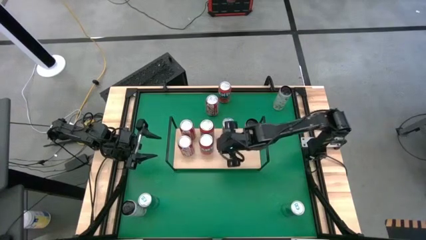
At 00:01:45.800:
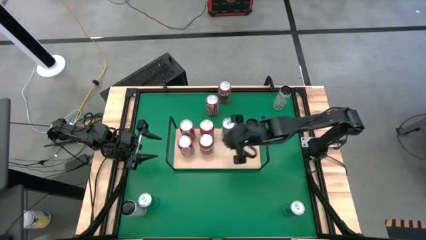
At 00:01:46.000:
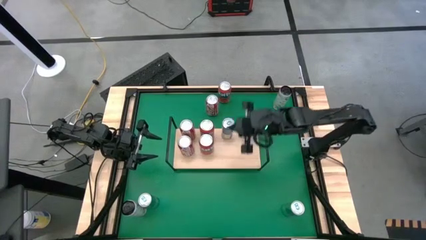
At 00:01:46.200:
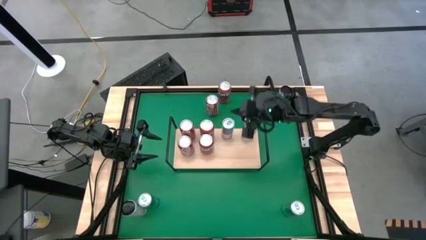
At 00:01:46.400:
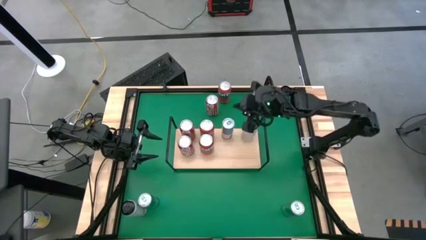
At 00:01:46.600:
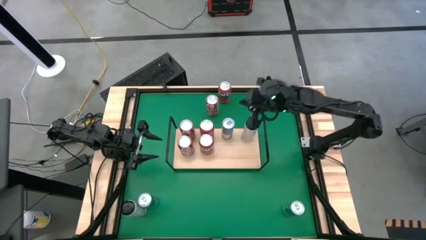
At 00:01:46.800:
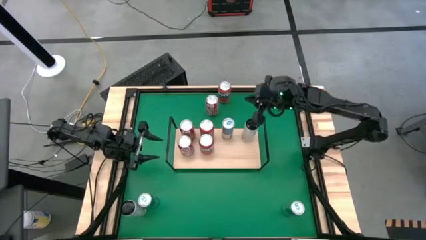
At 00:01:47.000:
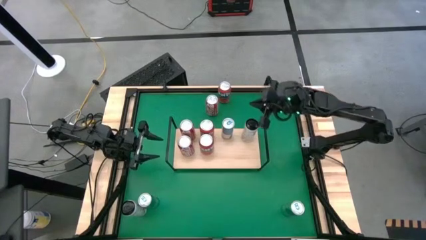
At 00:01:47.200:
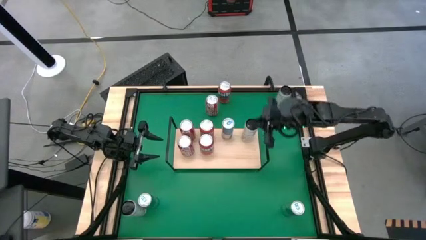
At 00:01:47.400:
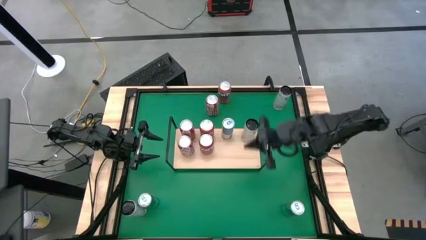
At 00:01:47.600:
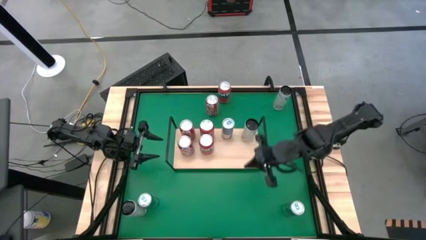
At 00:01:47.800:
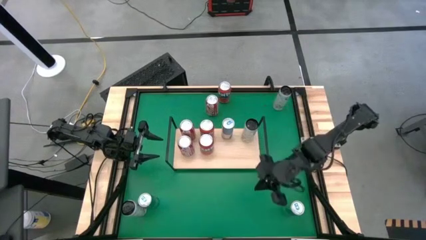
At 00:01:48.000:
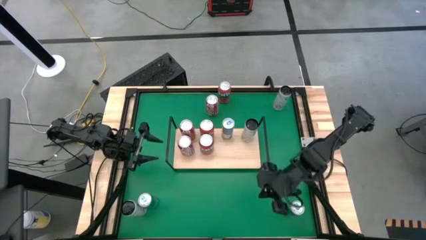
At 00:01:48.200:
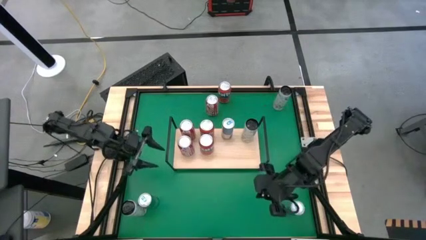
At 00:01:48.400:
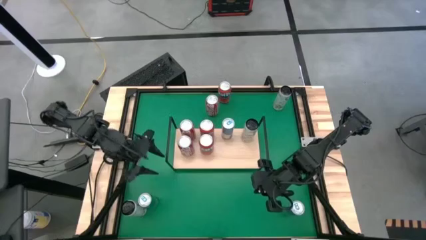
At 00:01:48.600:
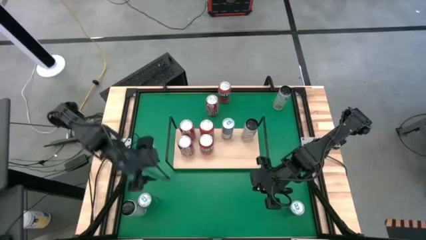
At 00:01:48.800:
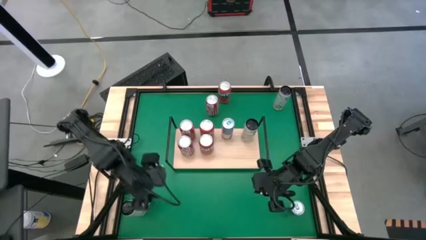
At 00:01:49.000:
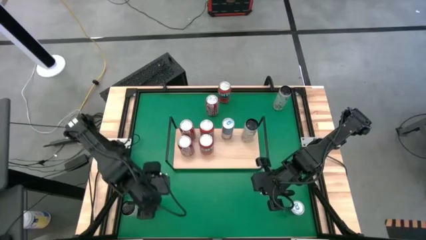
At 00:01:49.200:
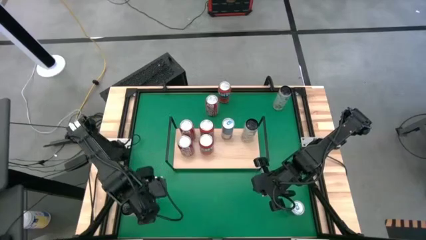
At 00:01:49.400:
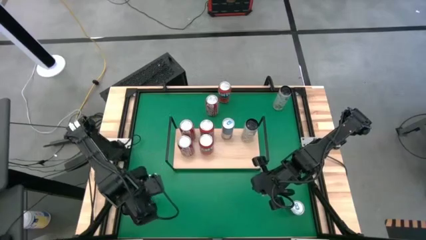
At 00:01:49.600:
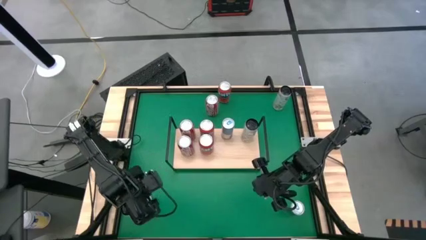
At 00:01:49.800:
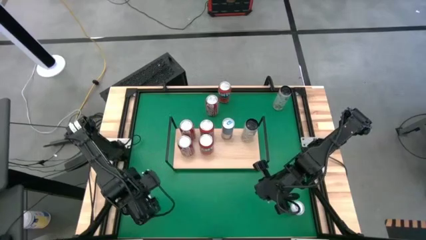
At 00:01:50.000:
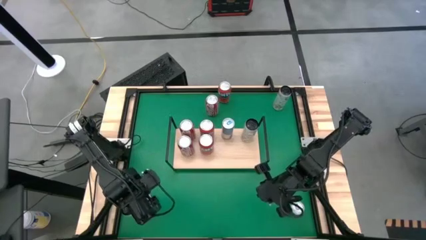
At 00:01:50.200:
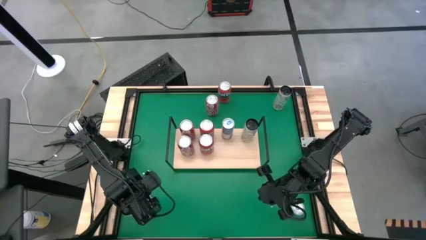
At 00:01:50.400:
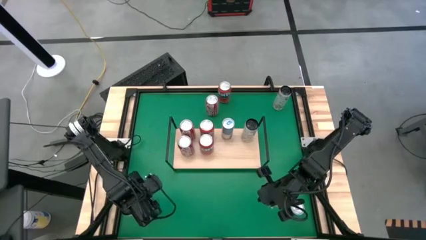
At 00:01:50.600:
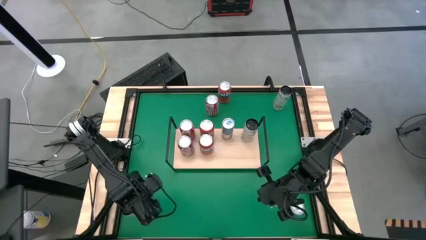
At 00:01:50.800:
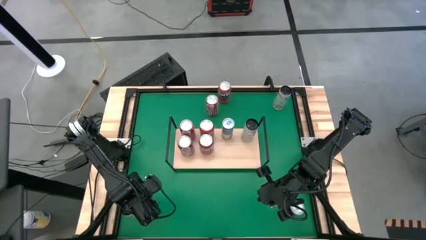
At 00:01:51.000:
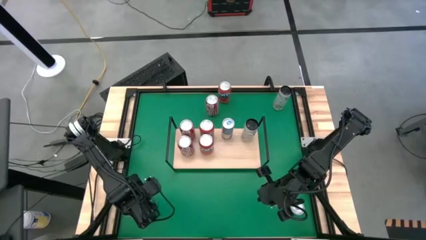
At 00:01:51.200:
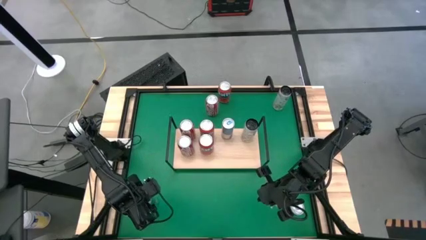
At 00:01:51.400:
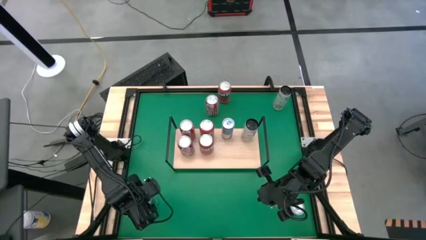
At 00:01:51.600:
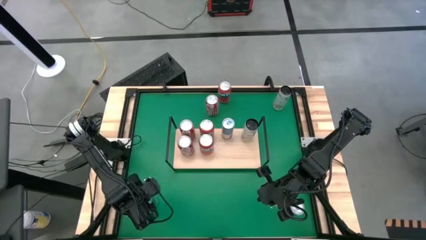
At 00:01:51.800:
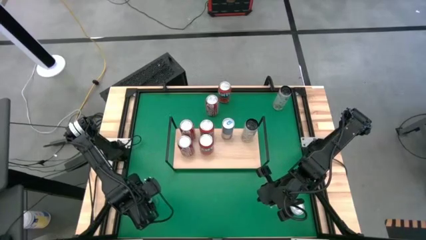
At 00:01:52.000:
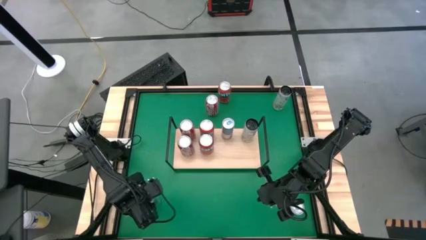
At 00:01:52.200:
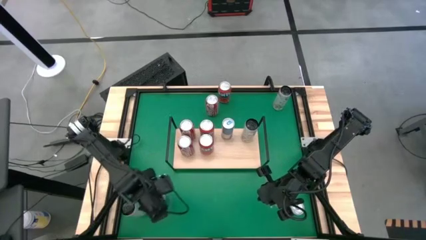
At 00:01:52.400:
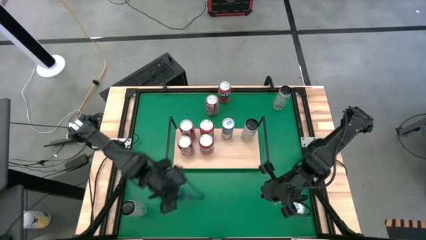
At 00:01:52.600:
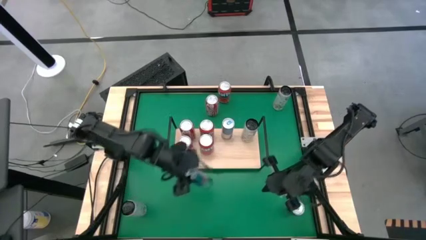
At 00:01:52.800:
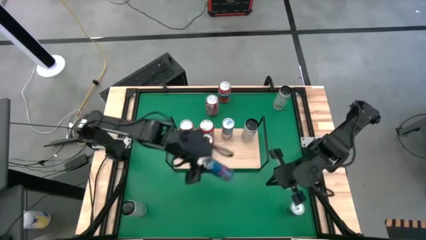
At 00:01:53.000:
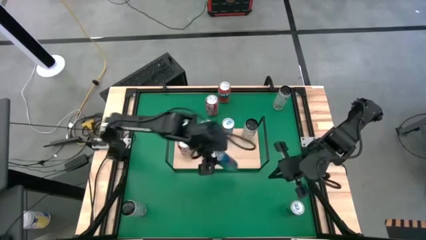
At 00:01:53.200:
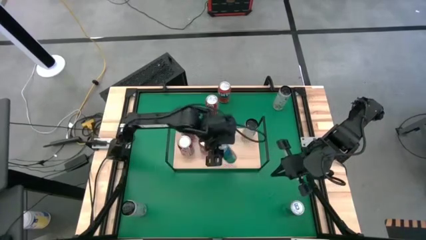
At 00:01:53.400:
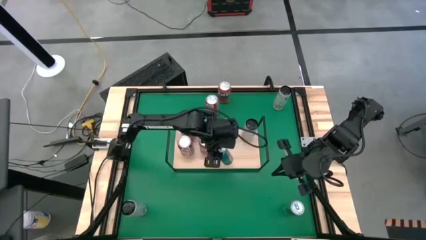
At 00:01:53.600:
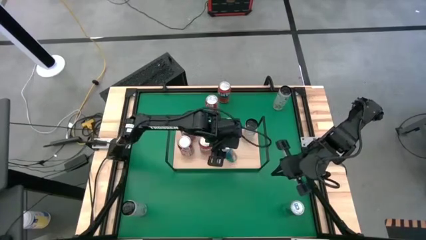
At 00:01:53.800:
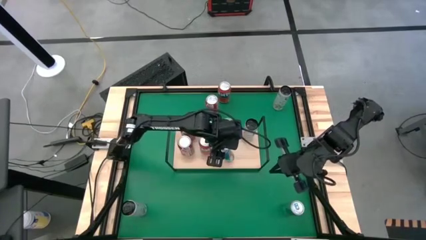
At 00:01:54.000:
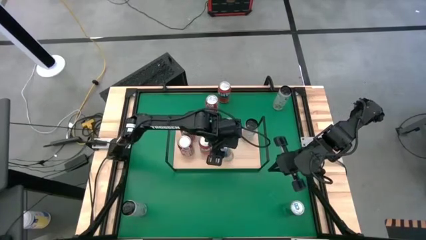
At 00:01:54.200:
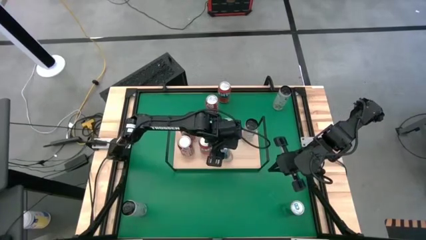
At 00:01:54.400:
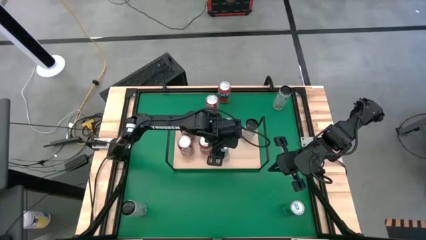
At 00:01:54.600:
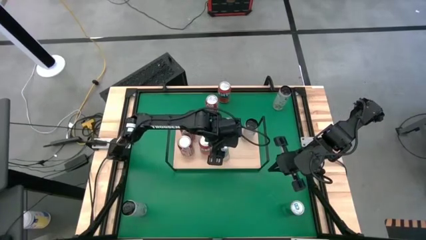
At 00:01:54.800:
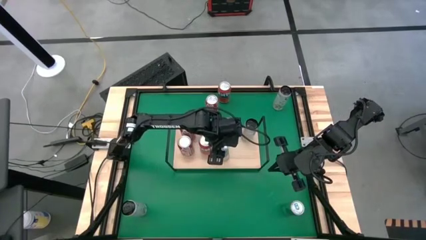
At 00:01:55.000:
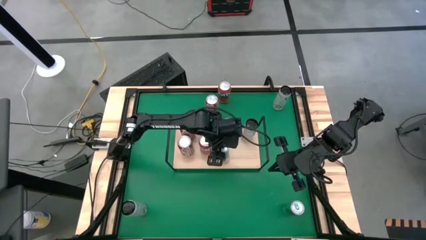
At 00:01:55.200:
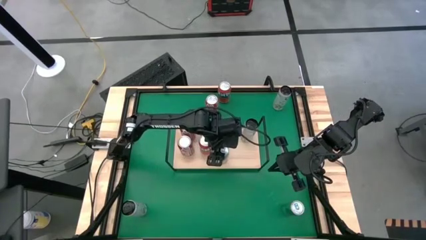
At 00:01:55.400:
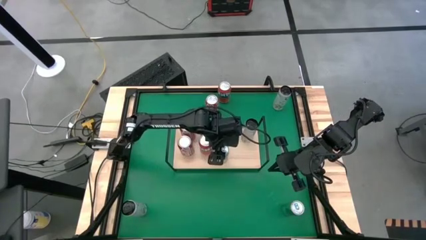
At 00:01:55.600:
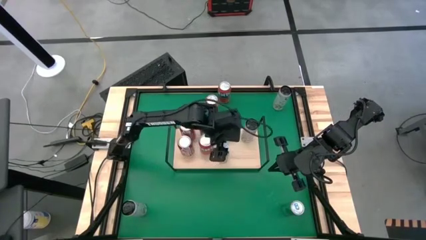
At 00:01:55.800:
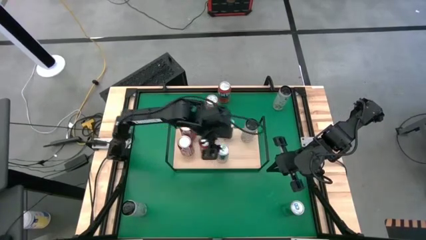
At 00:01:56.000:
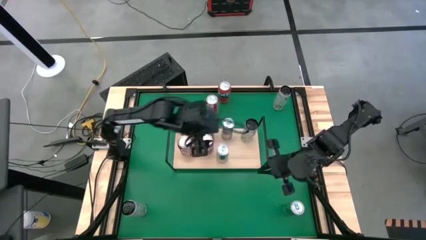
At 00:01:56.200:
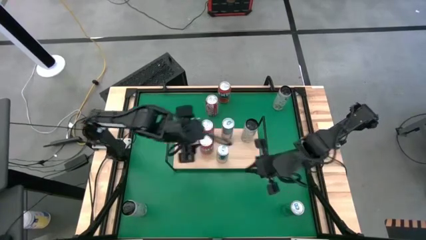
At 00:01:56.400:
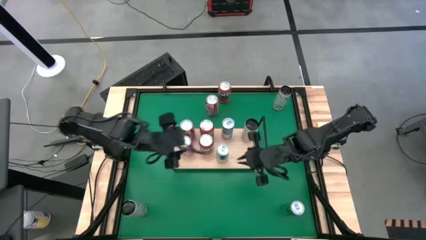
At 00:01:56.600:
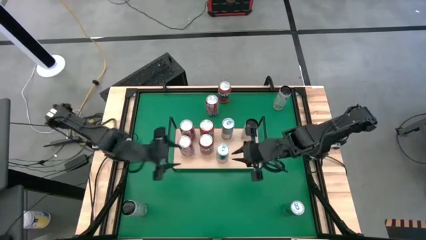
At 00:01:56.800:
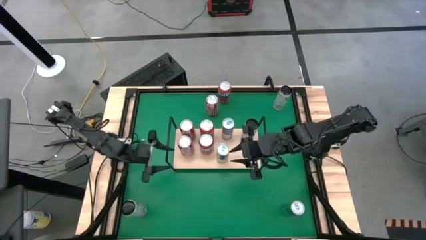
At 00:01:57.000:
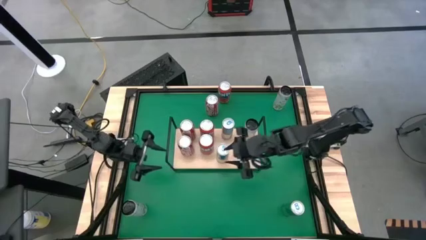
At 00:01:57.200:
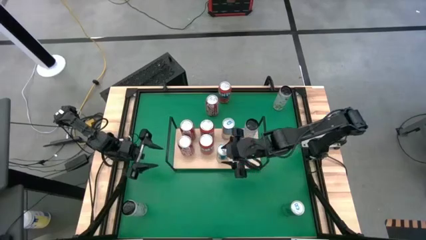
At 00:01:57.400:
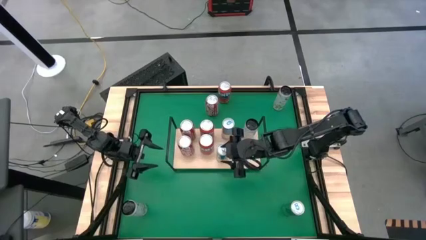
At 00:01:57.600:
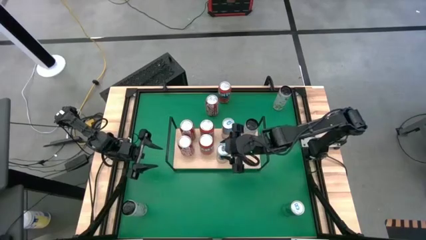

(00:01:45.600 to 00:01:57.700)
Task: Place canned beverage on shelf
Put the left blue soda can on the shelf aligned with the other blue soda can
